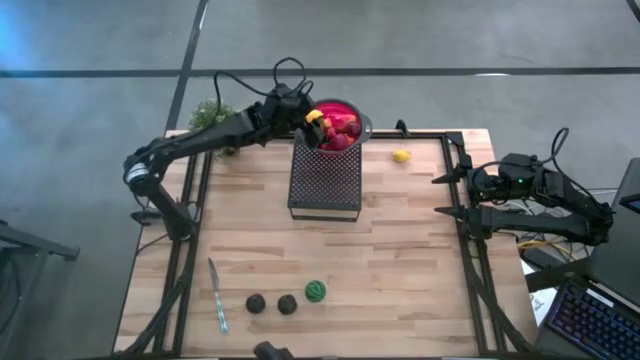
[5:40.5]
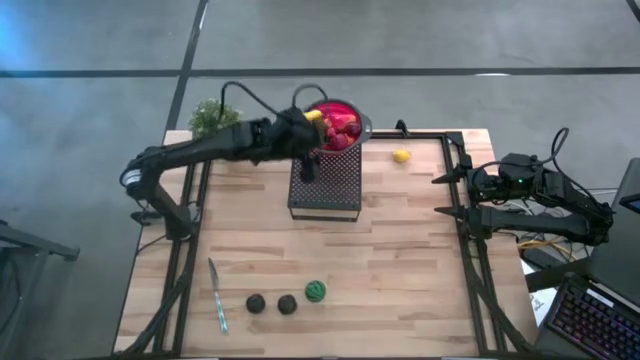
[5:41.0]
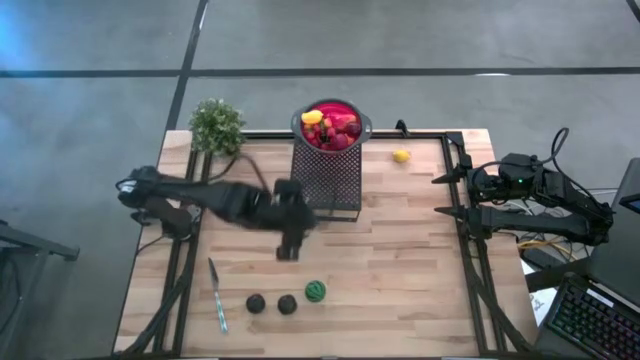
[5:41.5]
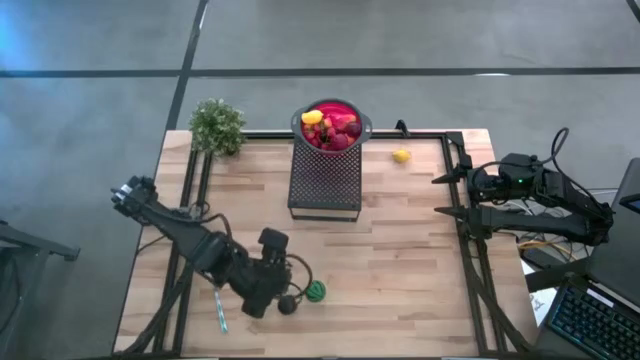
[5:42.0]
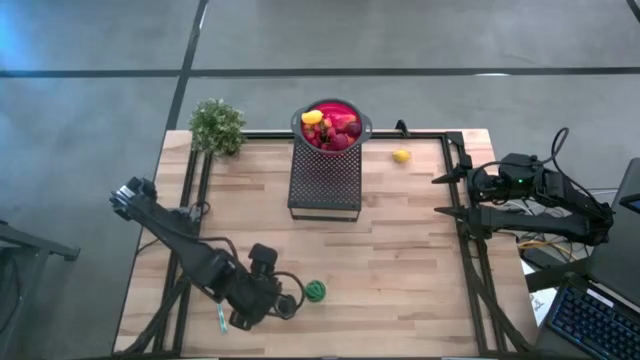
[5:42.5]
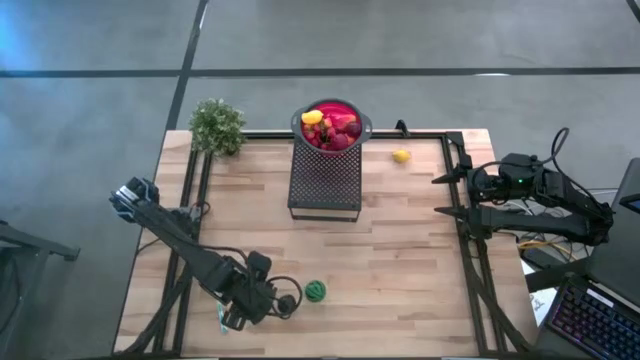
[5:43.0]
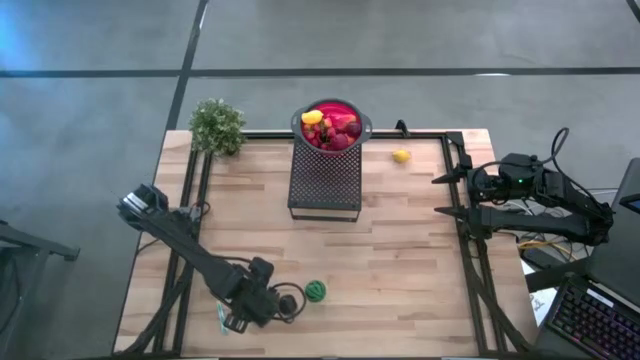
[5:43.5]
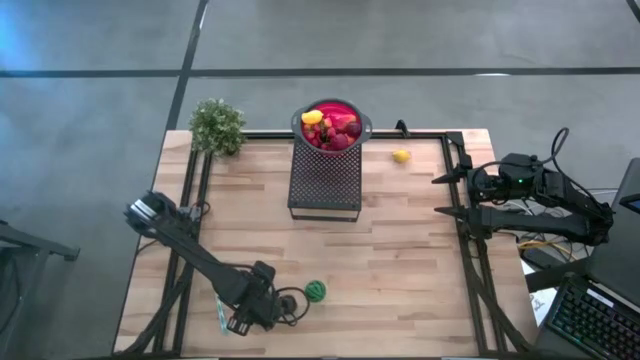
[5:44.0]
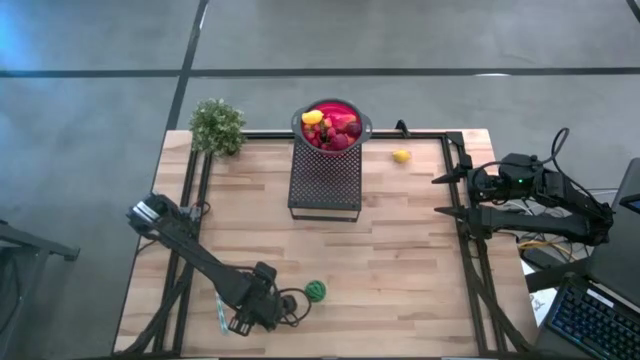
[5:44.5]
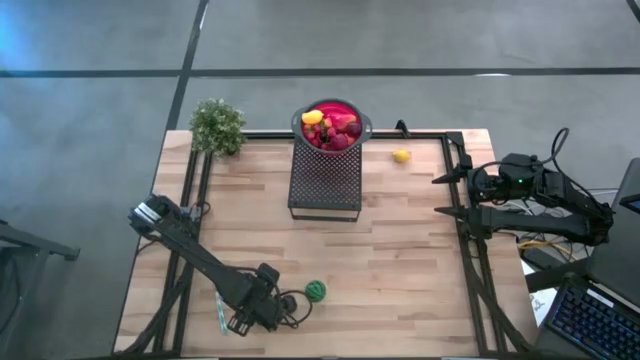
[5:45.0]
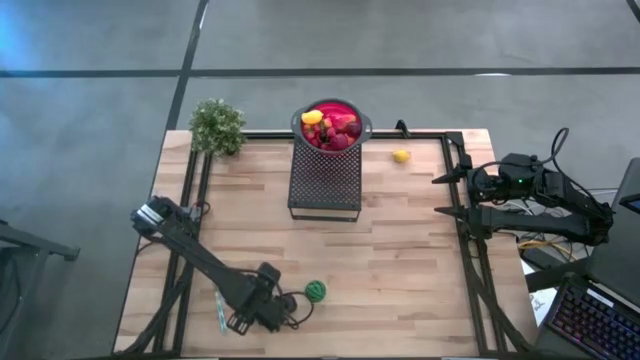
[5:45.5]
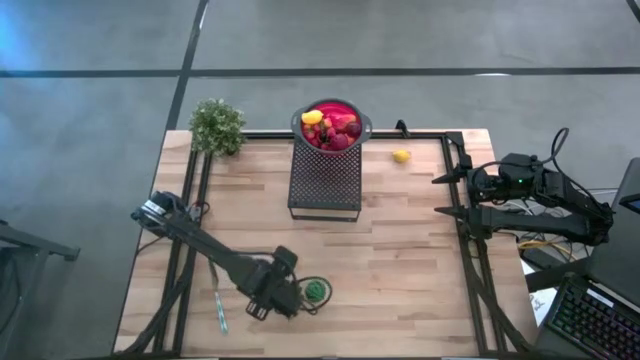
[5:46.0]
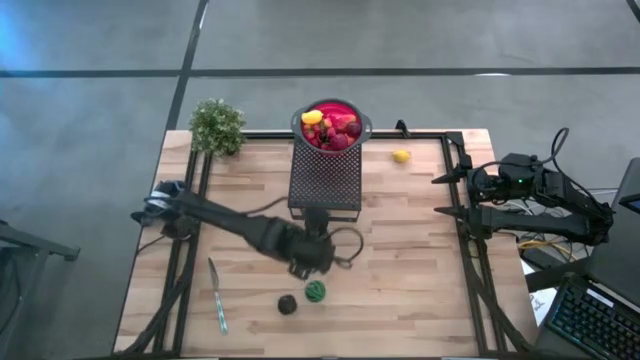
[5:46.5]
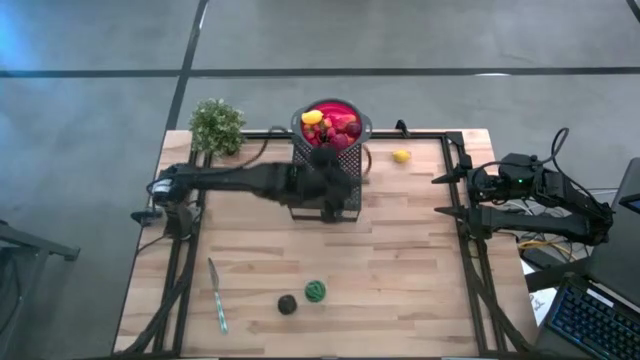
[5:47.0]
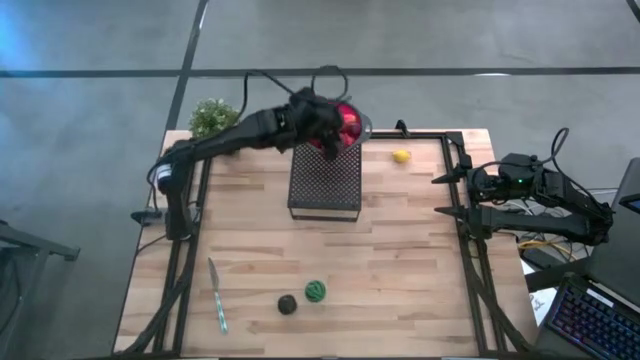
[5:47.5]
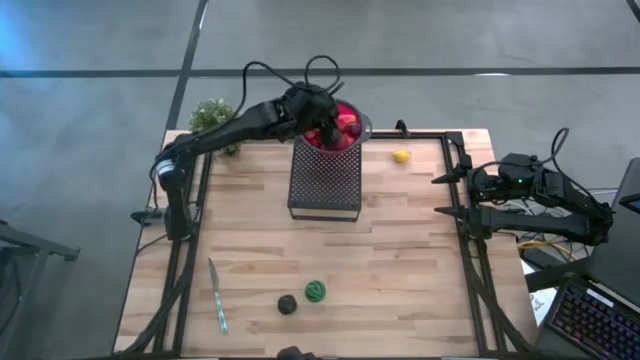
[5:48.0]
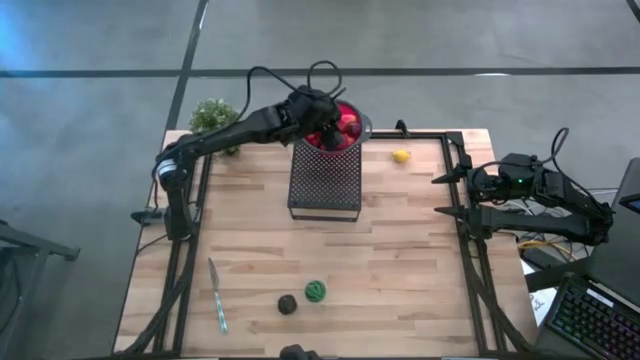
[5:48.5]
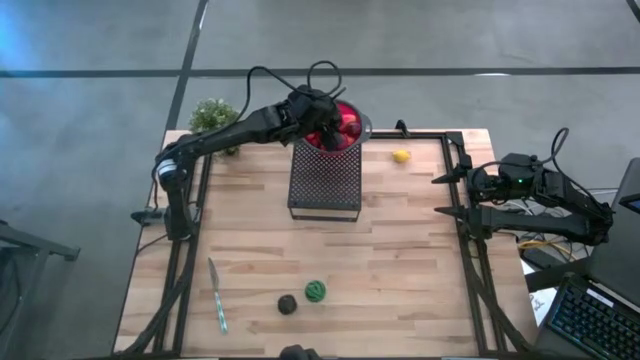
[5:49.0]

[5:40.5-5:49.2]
Task: Pick & Place Fruit
Put the plum into the red strainer bowl on the shelf

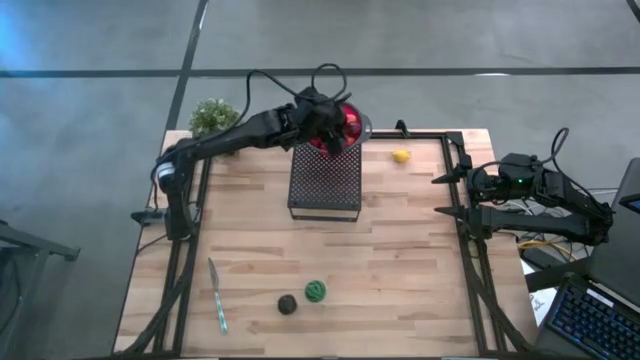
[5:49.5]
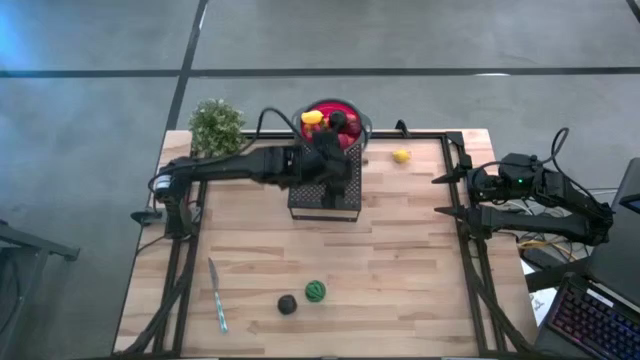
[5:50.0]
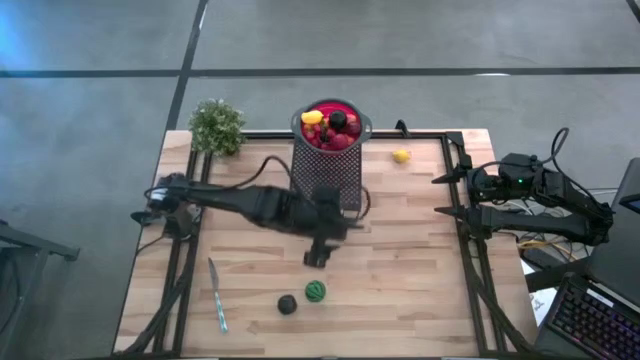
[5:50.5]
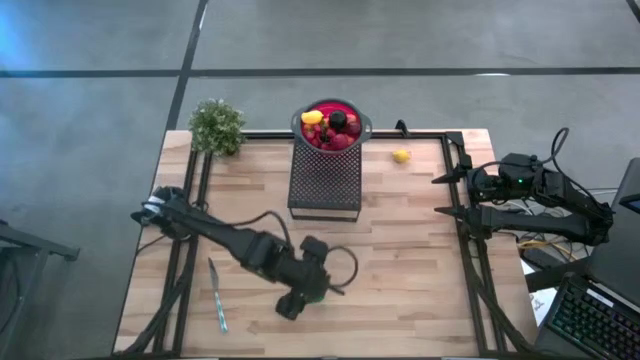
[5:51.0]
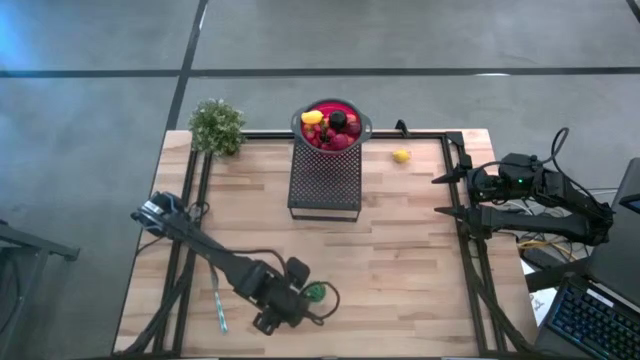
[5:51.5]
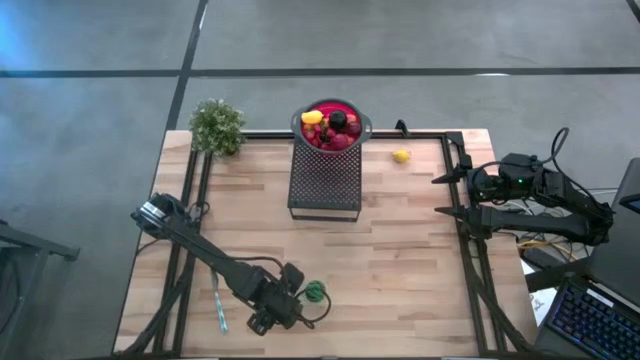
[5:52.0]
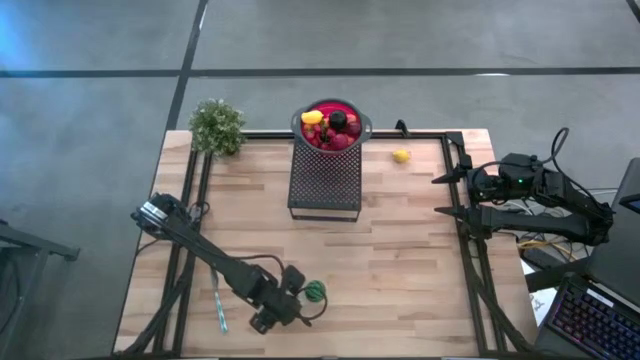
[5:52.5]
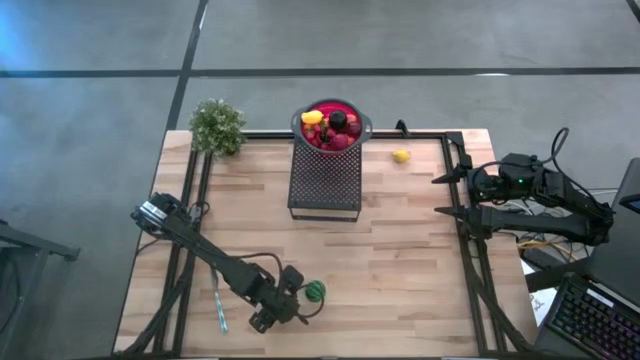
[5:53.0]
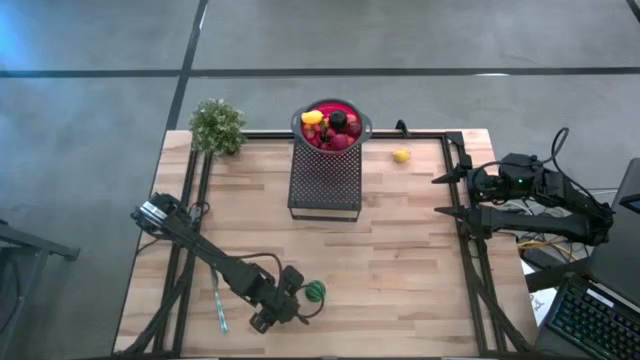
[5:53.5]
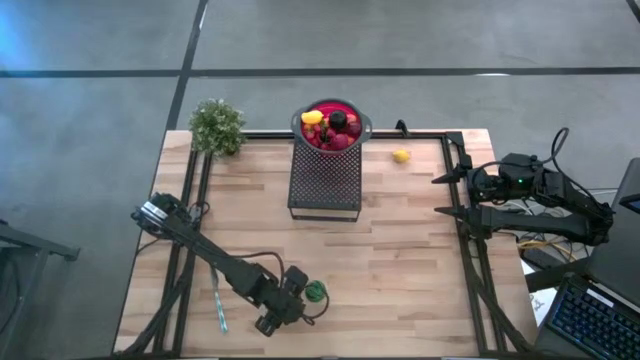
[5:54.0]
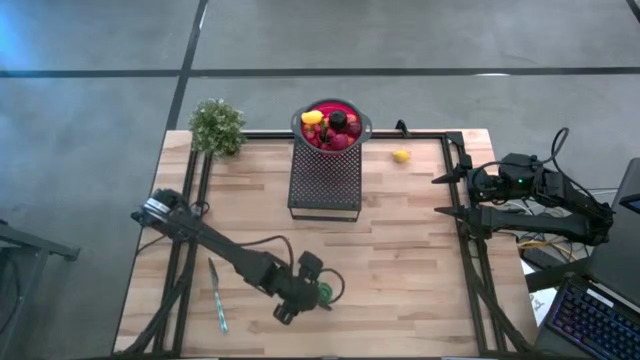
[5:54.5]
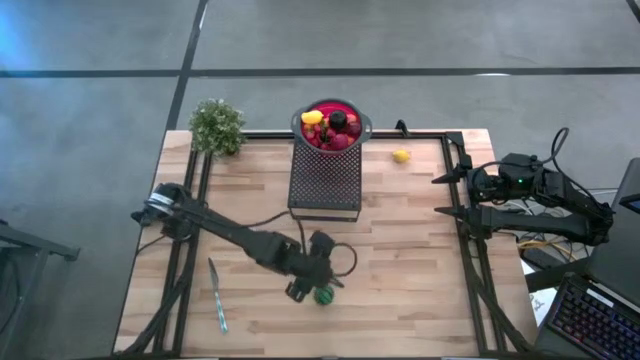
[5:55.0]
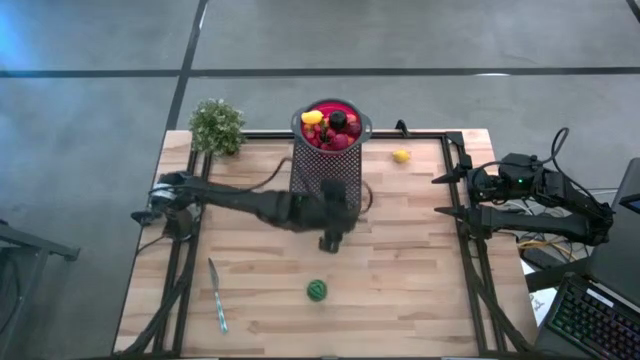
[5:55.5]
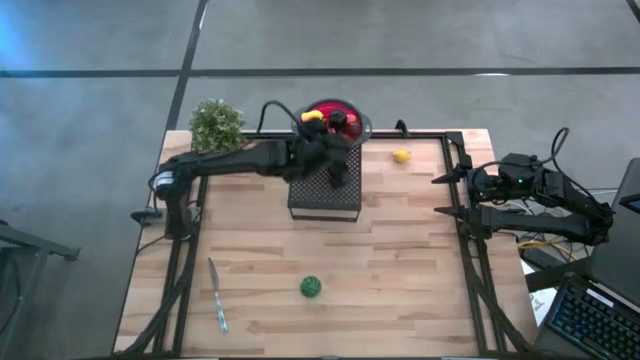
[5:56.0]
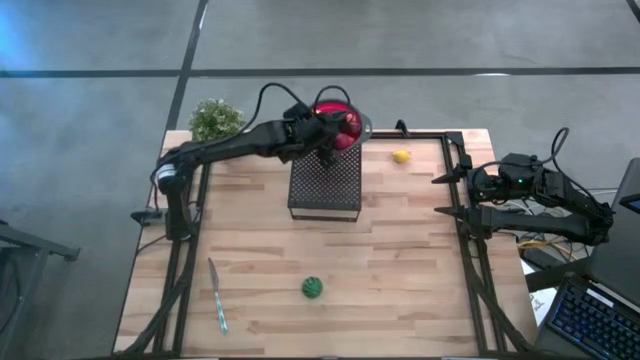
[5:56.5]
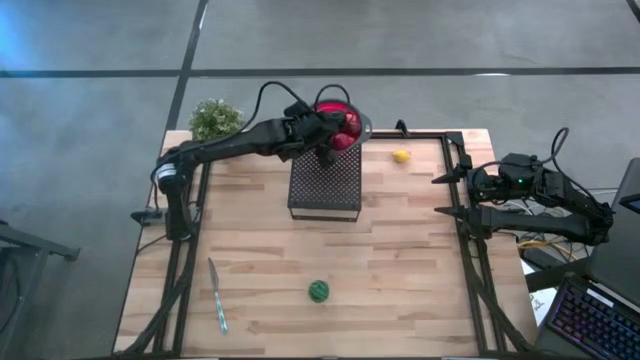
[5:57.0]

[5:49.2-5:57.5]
Put the plum into the red strainer bowl on the shelf

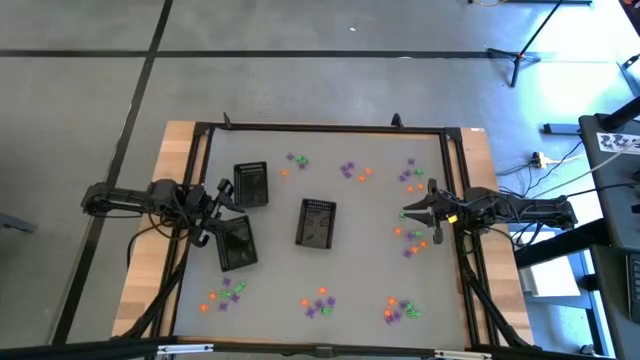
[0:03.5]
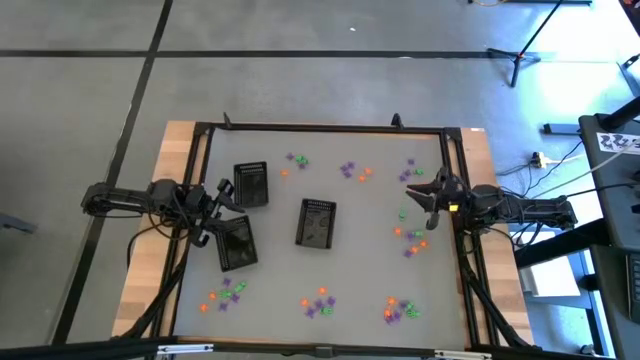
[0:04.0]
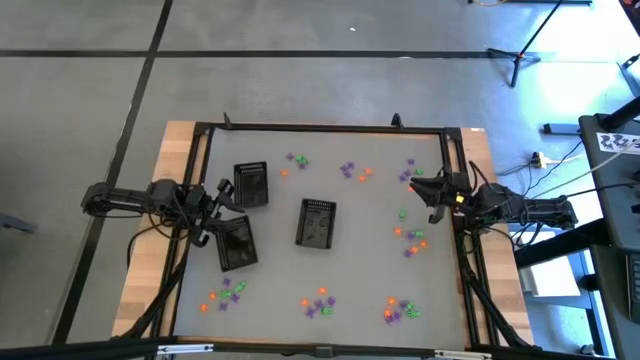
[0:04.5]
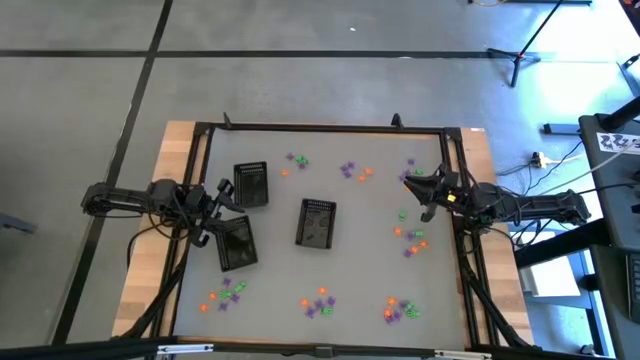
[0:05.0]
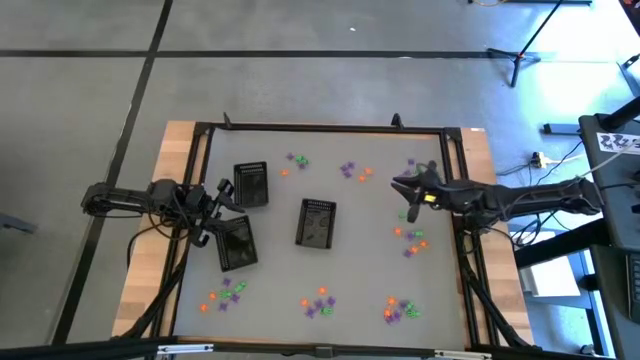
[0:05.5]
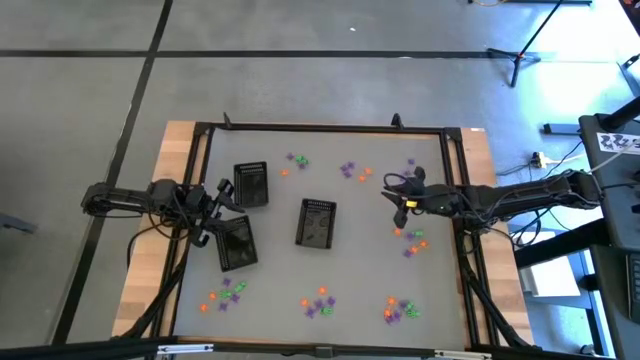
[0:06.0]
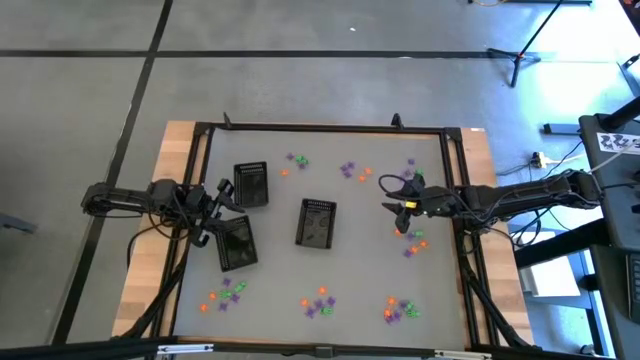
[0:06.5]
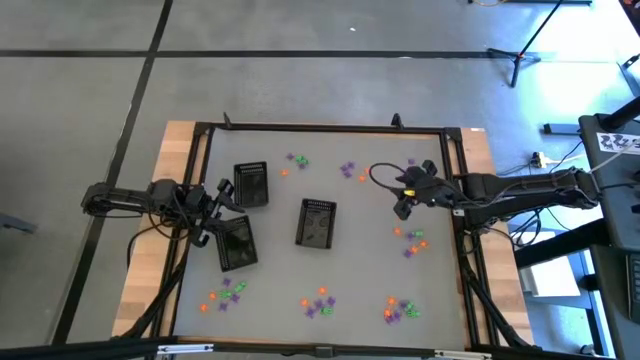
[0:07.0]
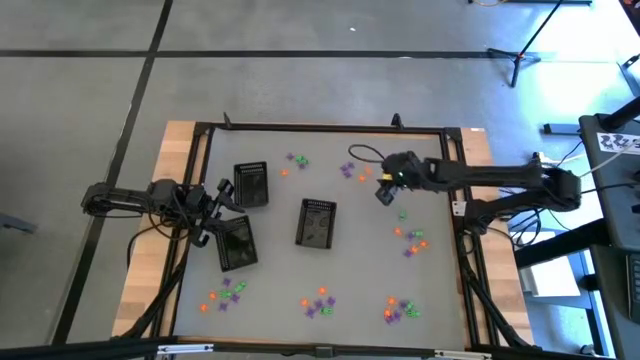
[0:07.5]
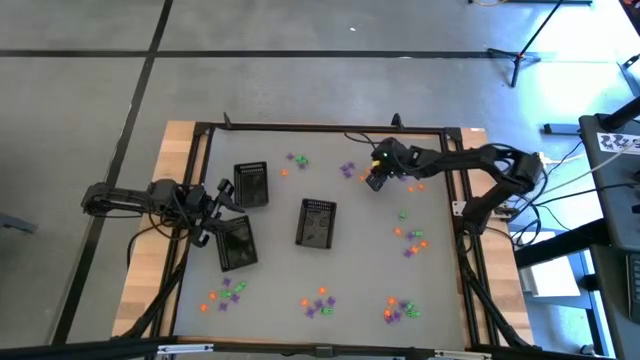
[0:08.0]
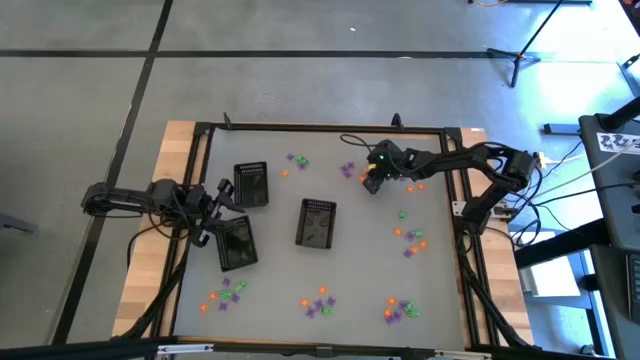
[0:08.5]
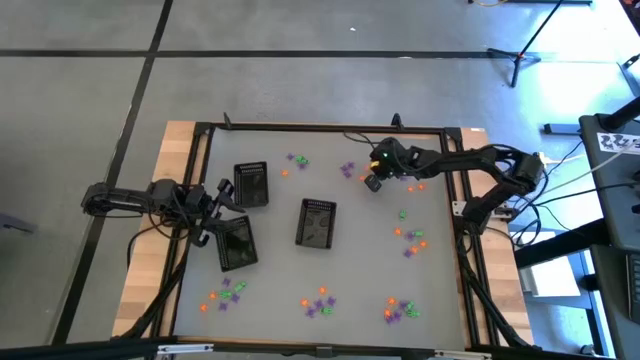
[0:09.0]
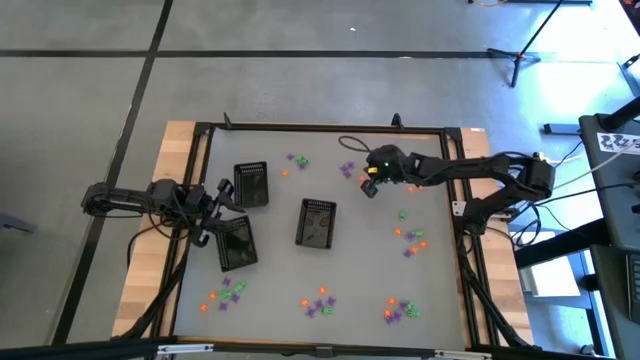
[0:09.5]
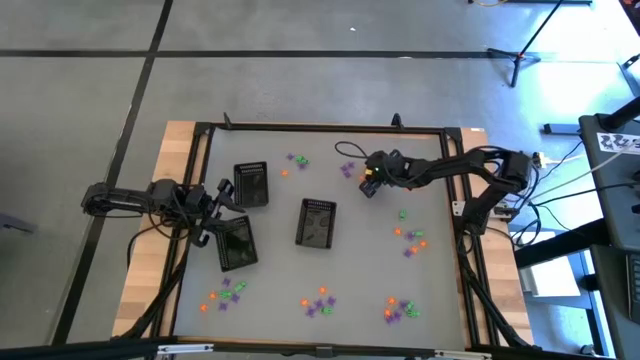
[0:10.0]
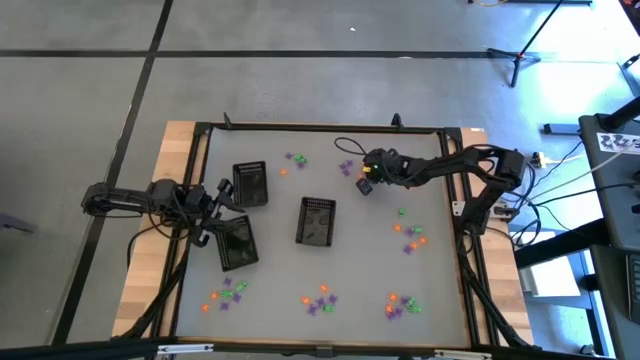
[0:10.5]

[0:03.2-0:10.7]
Task: Sort Halloween decoration
Put the orange spider toy into the bottom right black basket
